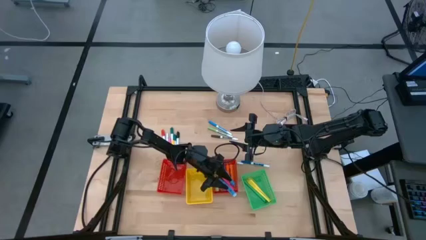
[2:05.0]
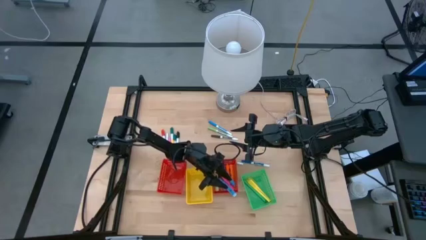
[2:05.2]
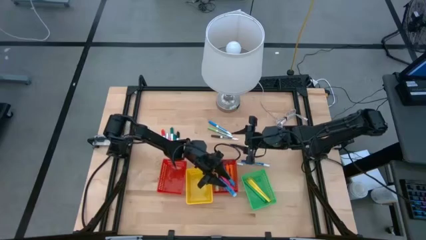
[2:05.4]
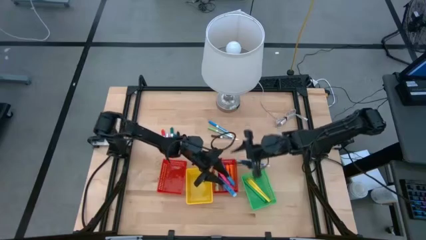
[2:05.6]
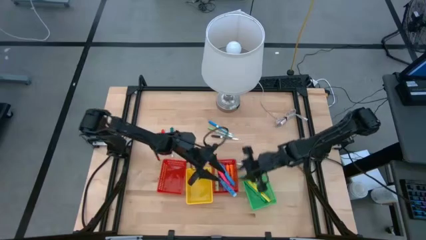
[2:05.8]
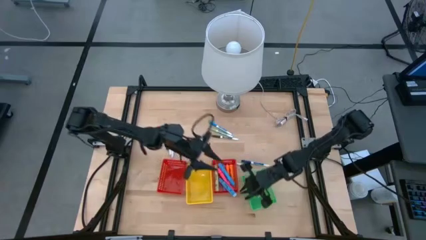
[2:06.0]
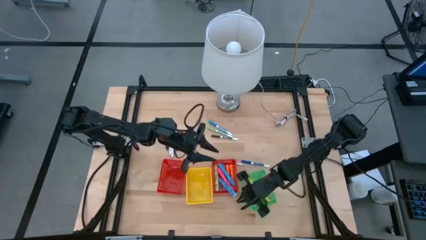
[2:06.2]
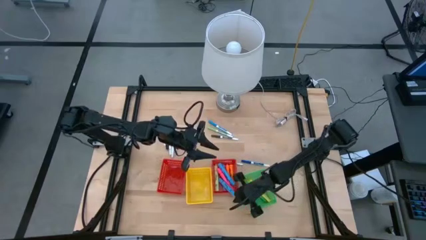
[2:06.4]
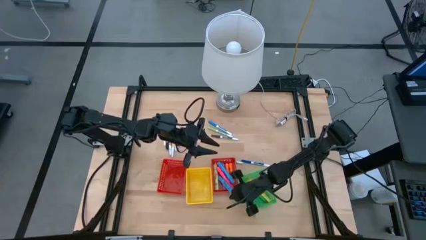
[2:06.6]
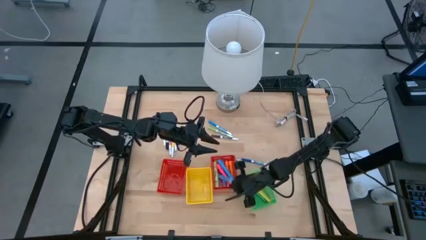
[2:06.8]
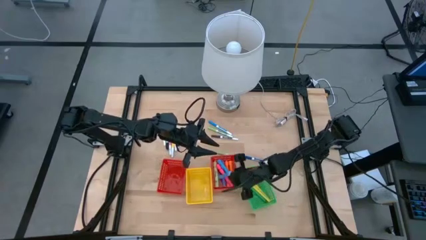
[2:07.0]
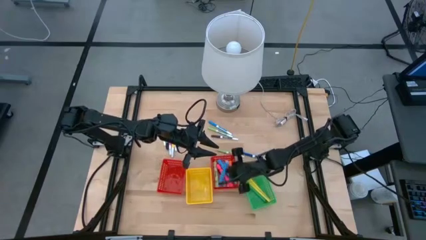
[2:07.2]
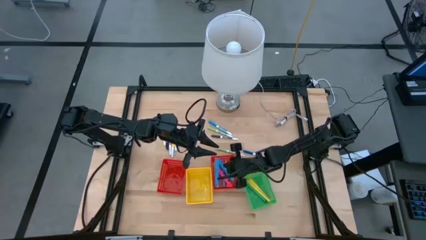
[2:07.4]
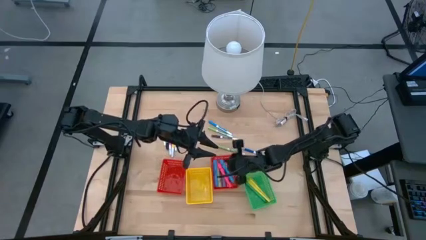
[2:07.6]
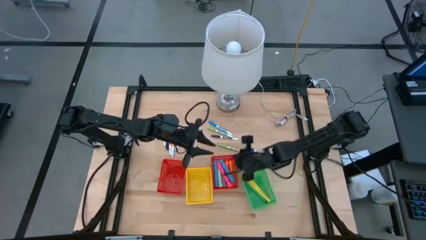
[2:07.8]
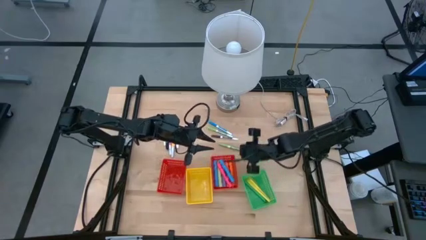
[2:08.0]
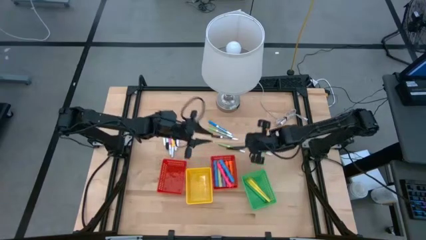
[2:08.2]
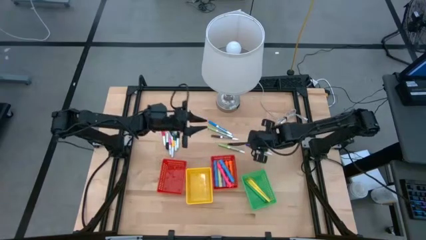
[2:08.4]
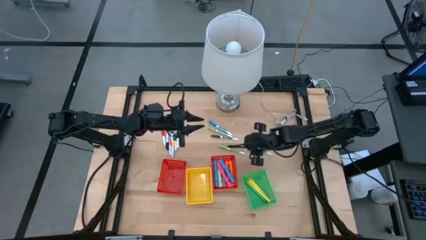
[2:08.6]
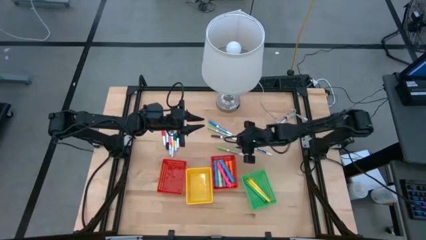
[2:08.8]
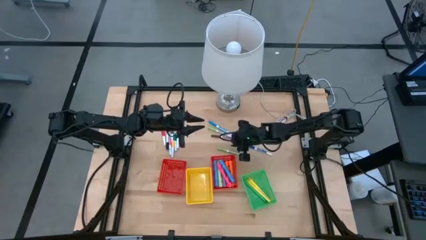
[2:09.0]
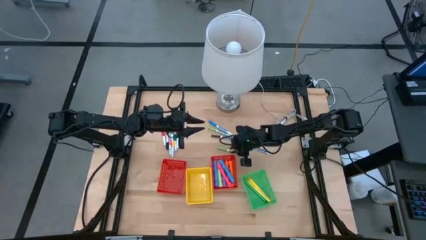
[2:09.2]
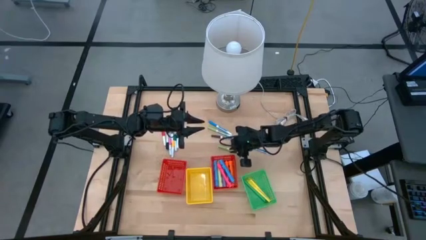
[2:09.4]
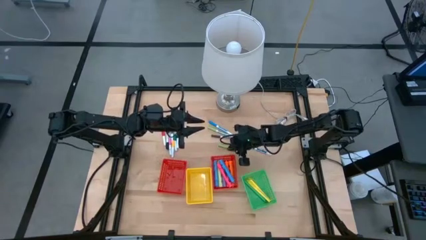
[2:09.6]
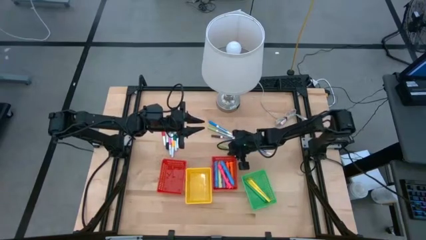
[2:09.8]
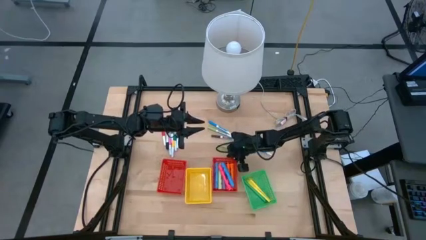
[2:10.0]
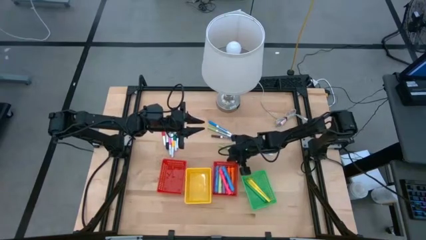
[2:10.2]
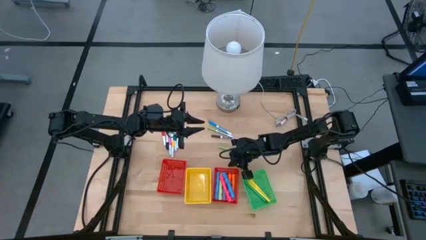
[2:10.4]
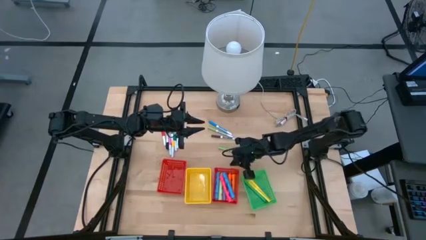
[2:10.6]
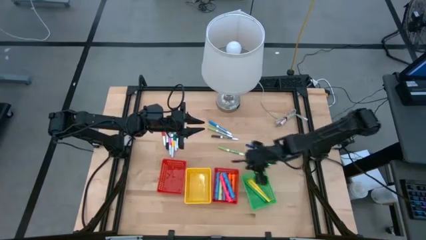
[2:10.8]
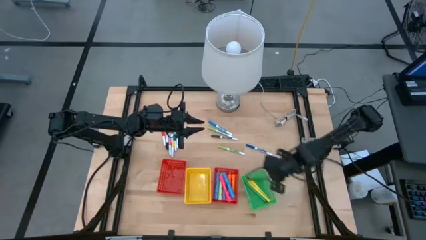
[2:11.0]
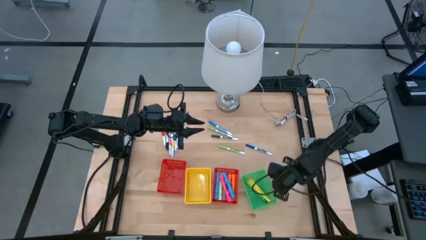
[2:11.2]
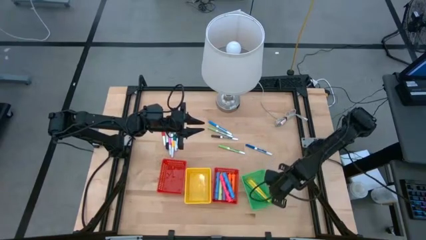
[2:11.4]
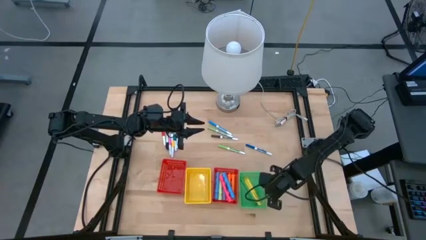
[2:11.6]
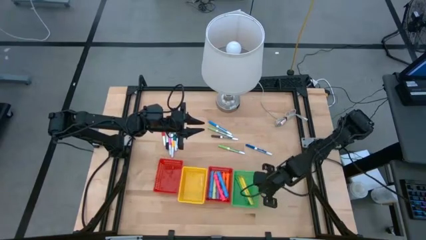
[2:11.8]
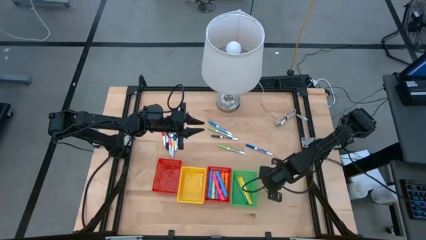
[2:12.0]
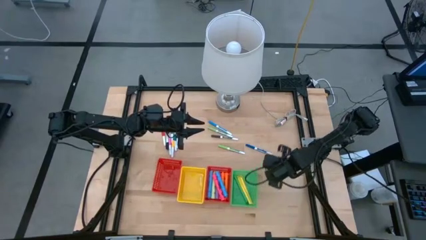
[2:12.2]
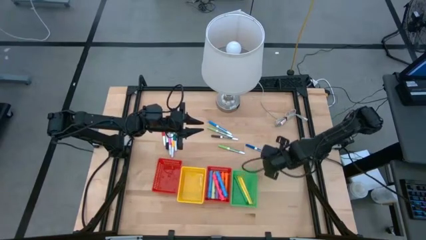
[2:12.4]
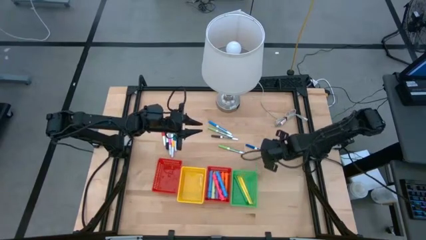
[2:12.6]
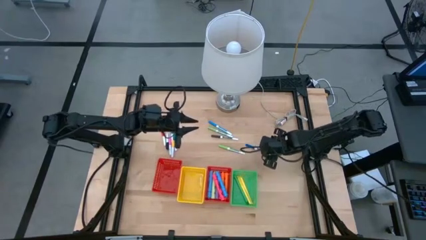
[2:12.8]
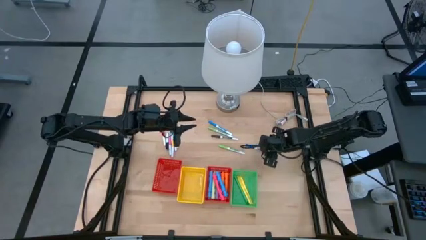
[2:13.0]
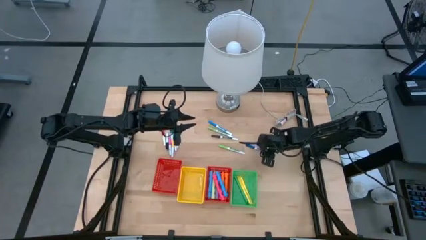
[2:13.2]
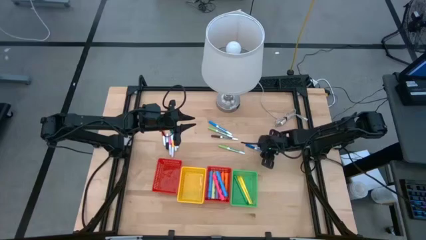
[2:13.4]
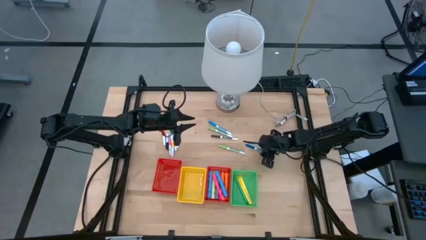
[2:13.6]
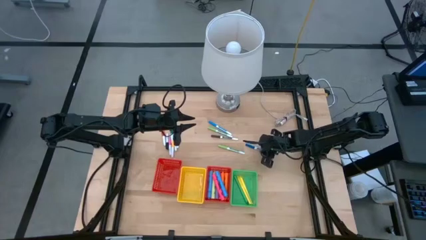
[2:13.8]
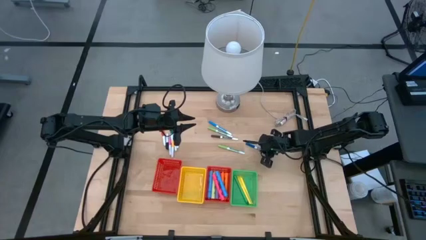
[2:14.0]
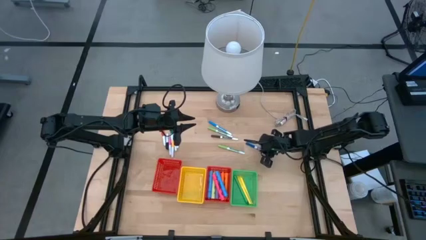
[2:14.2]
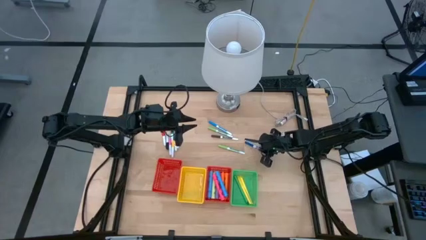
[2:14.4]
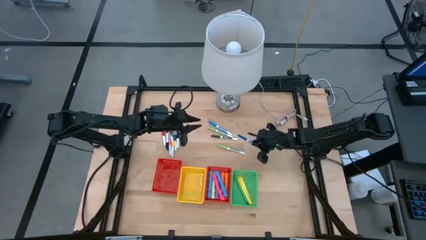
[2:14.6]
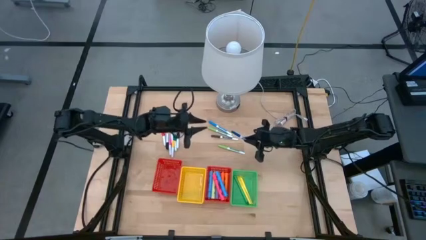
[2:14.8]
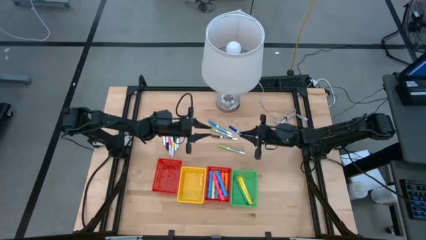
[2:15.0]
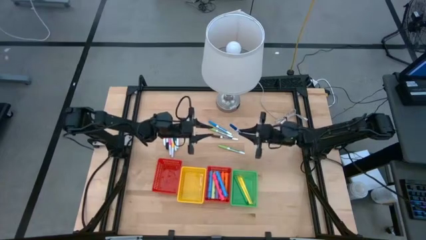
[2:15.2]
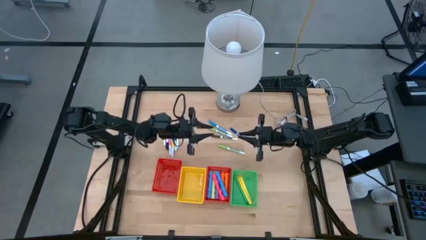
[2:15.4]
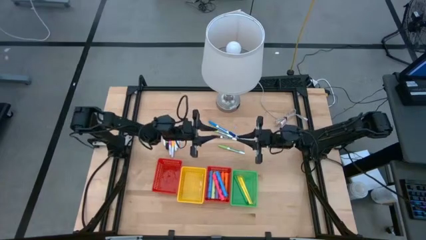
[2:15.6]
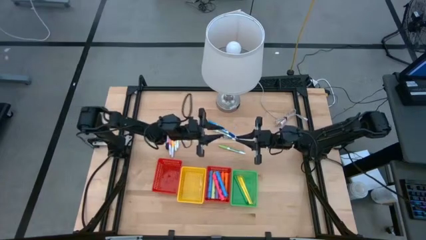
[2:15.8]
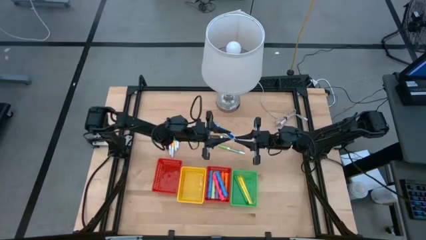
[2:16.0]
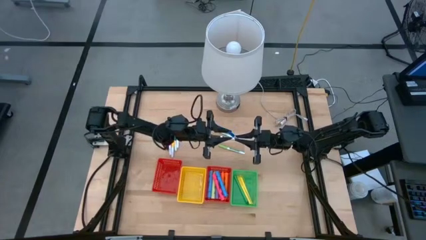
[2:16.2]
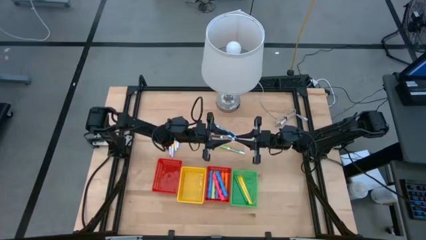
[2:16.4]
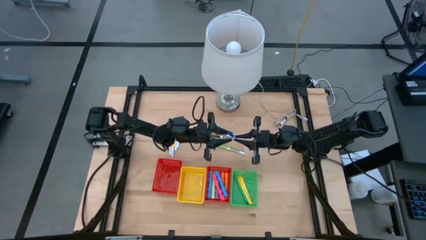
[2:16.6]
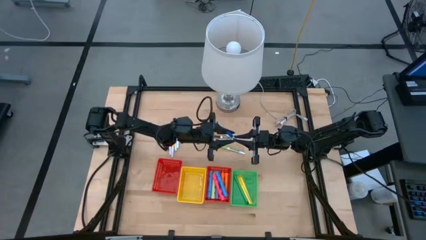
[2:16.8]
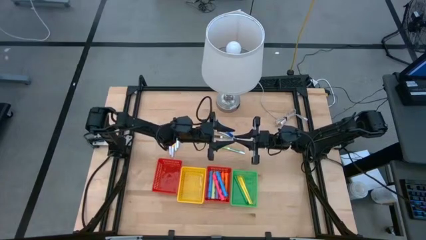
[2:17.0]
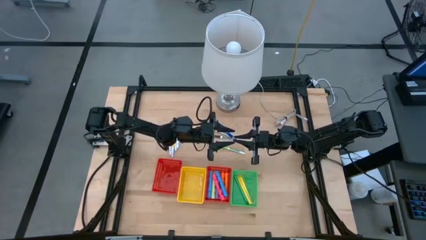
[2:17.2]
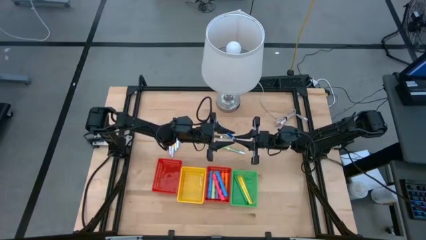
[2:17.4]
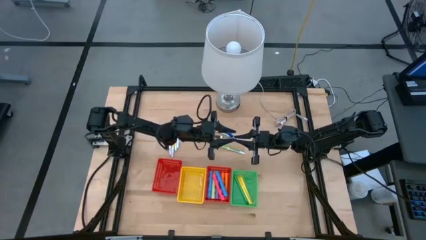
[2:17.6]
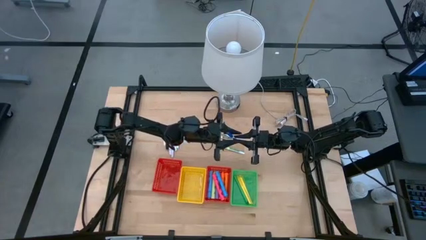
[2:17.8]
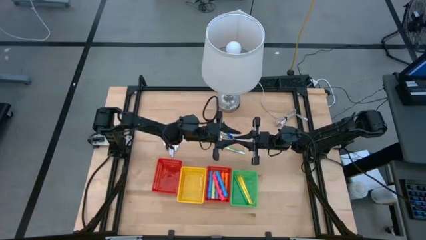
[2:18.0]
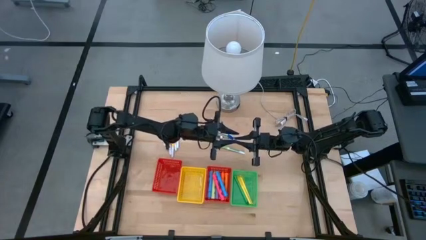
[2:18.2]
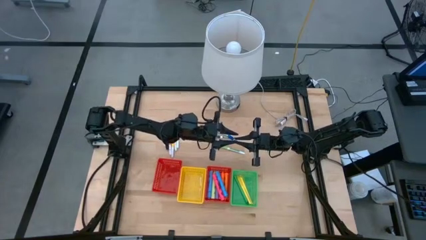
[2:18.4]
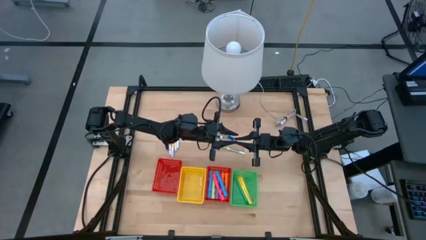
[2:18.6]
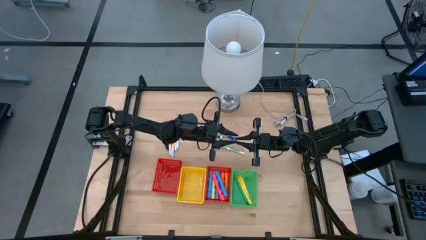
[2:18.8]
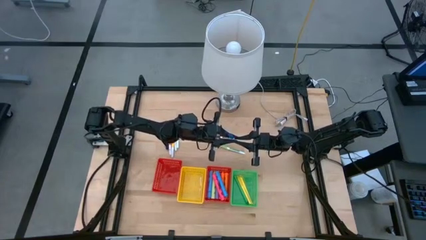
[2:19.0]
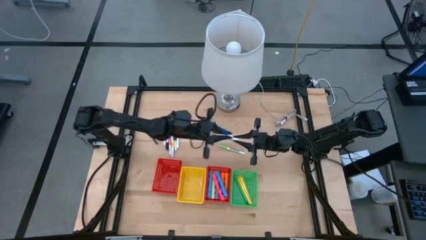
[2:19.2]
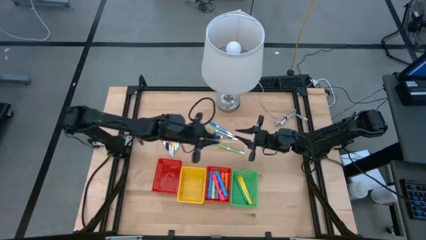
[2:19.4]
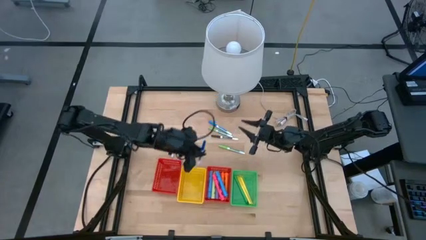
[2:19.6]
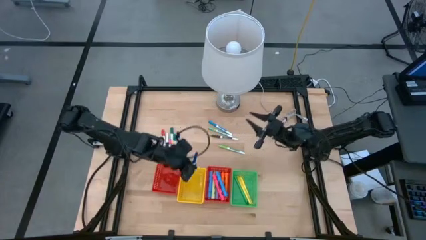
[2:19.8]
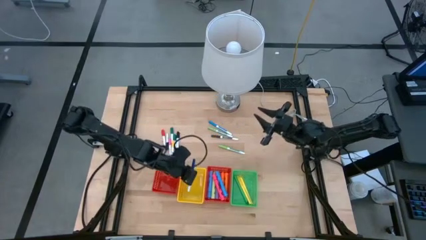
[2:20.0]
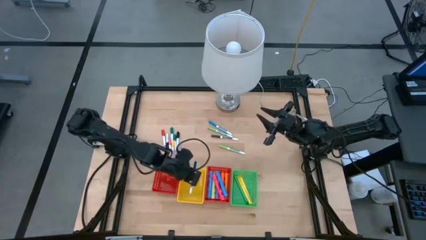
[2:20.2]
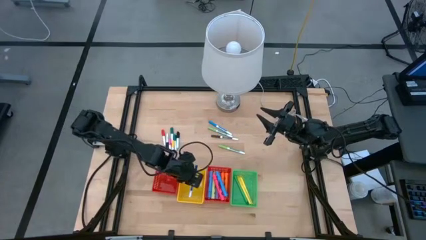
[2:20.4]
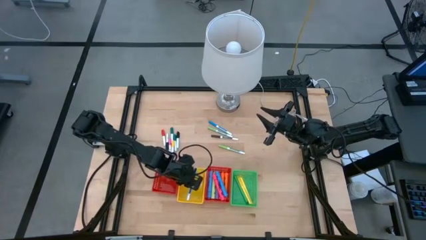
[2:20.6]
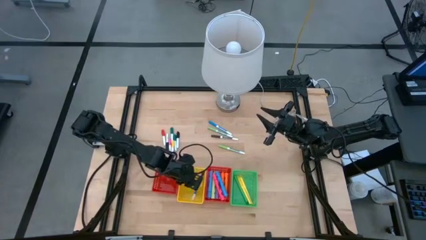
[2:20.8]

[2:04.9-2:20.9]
Task: Pick & Place Markers
Put the blue marker into the yellow bin
